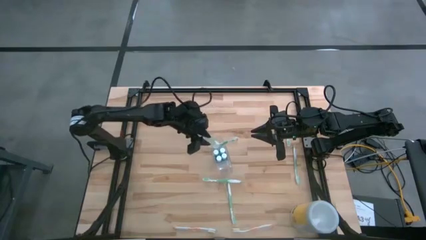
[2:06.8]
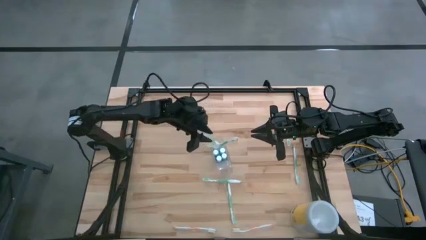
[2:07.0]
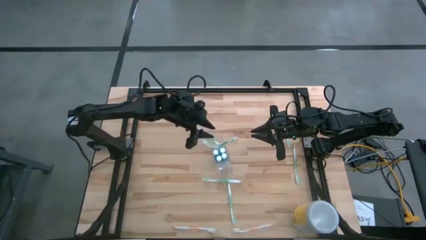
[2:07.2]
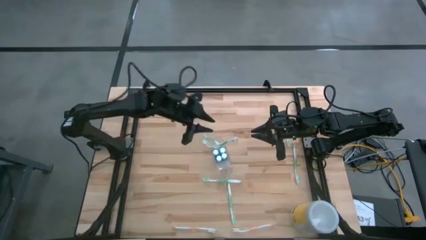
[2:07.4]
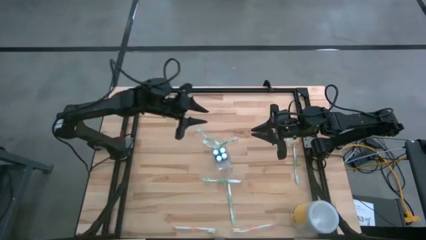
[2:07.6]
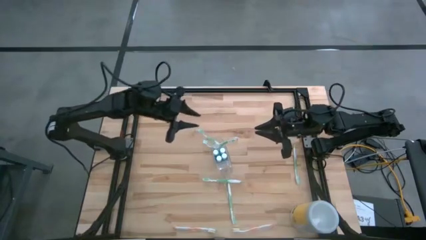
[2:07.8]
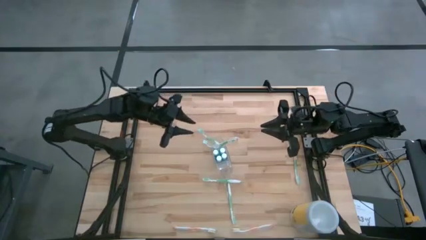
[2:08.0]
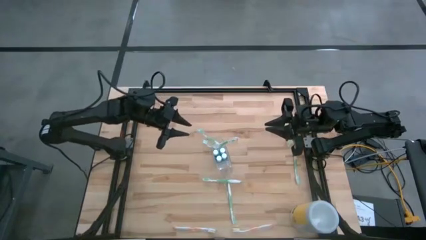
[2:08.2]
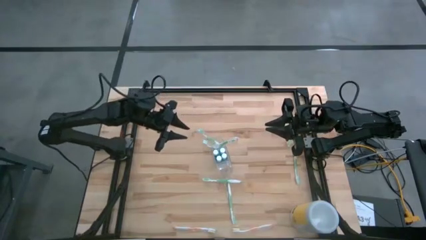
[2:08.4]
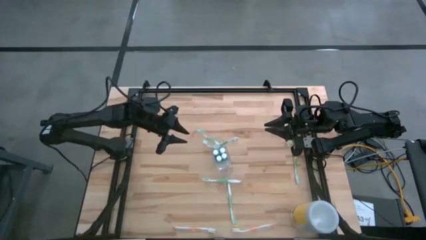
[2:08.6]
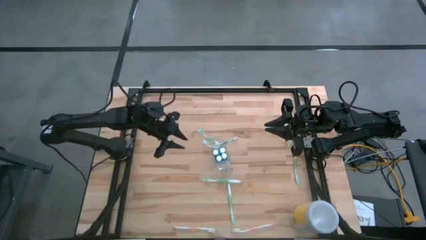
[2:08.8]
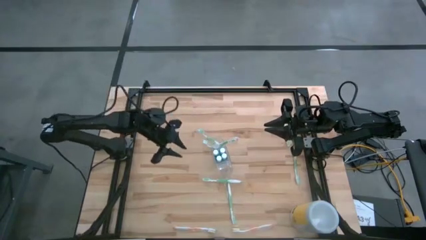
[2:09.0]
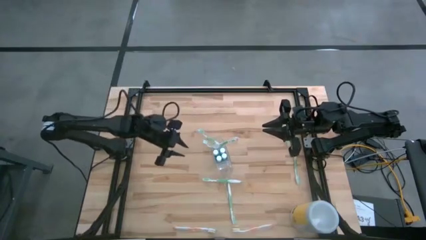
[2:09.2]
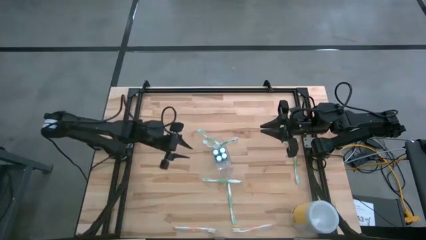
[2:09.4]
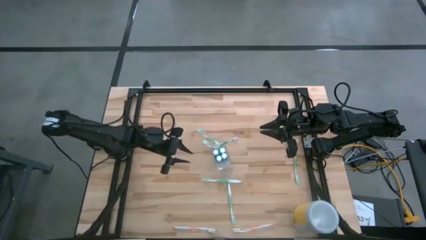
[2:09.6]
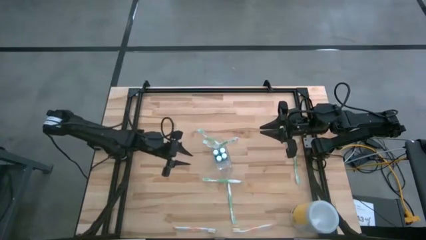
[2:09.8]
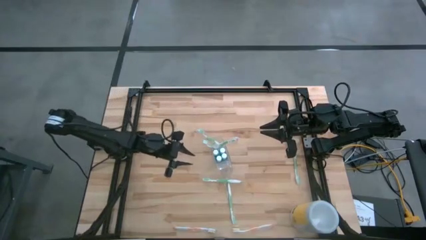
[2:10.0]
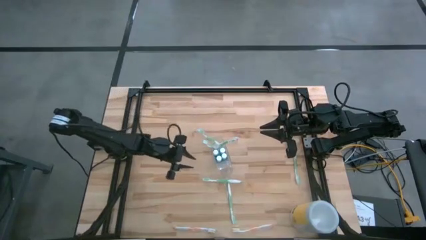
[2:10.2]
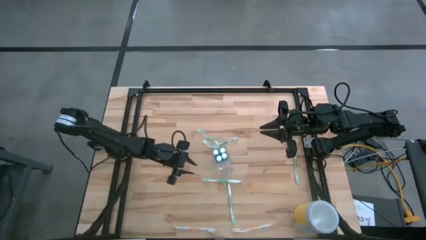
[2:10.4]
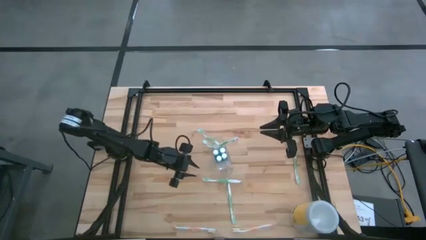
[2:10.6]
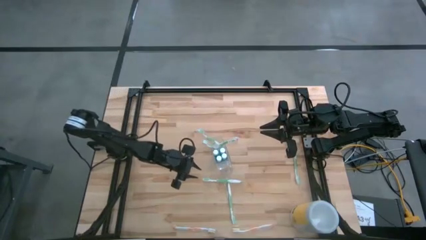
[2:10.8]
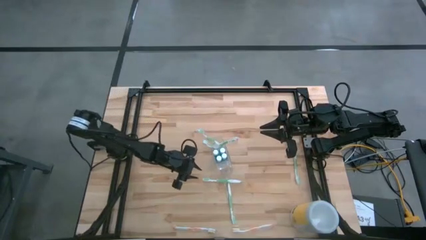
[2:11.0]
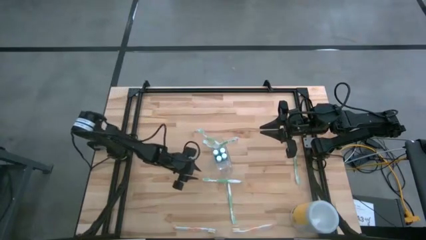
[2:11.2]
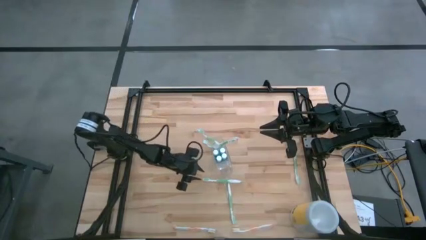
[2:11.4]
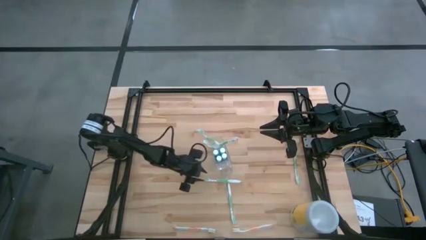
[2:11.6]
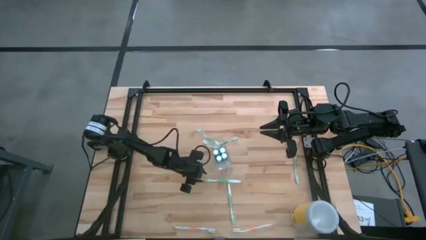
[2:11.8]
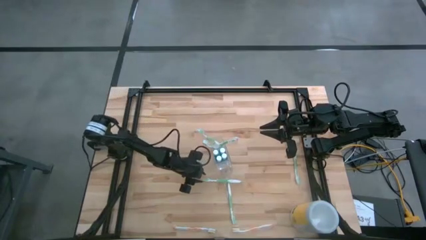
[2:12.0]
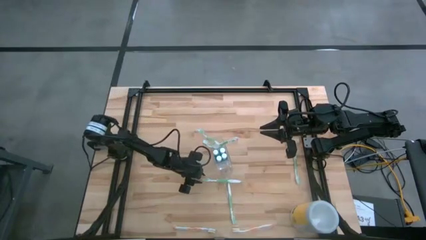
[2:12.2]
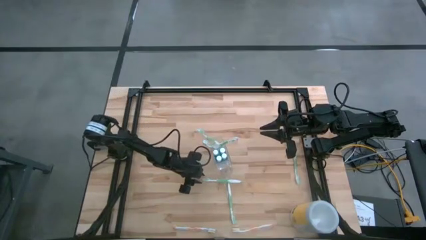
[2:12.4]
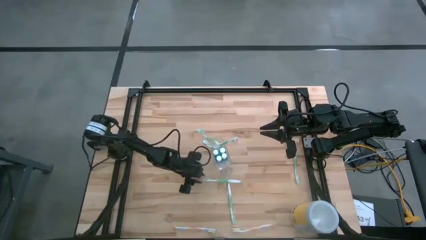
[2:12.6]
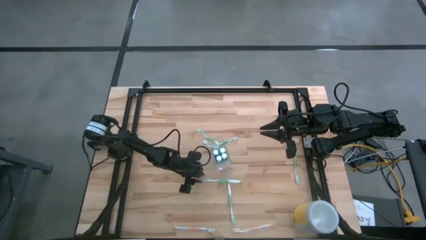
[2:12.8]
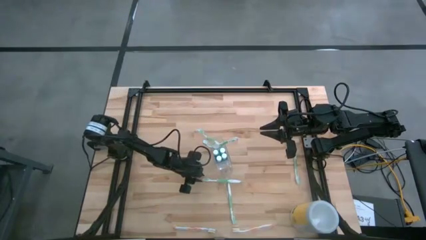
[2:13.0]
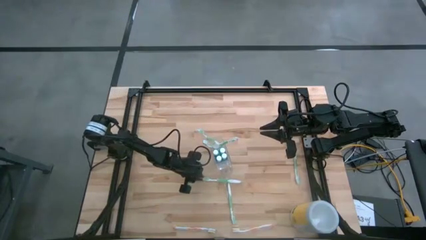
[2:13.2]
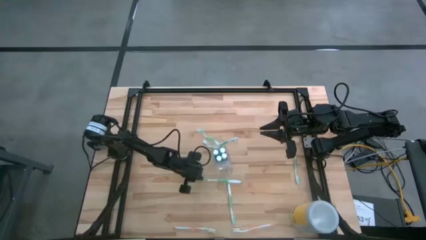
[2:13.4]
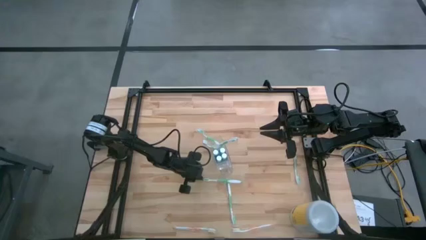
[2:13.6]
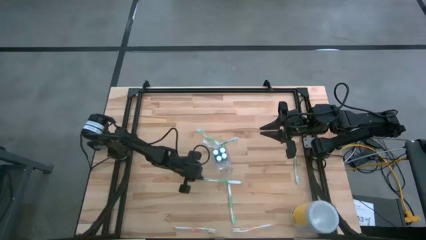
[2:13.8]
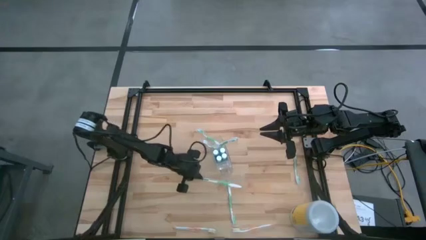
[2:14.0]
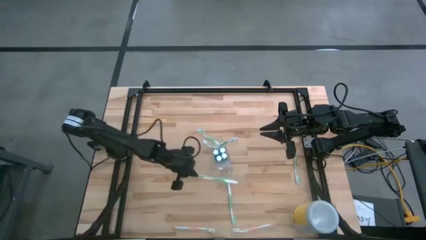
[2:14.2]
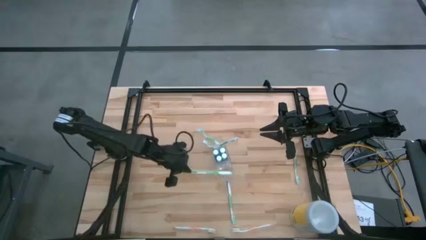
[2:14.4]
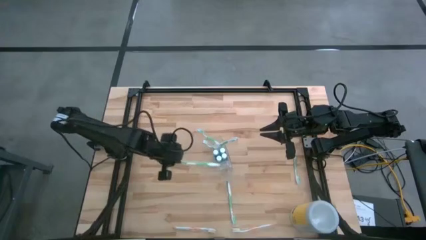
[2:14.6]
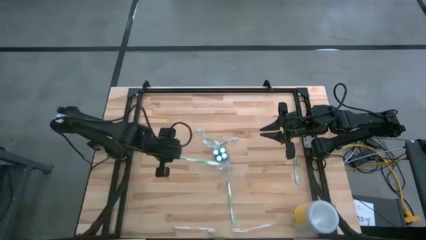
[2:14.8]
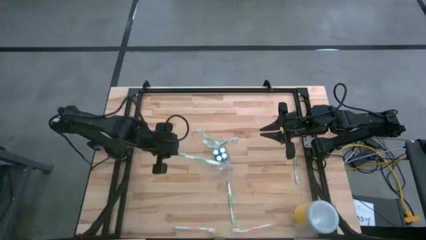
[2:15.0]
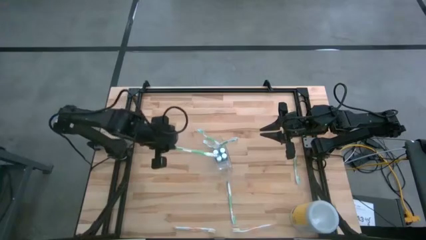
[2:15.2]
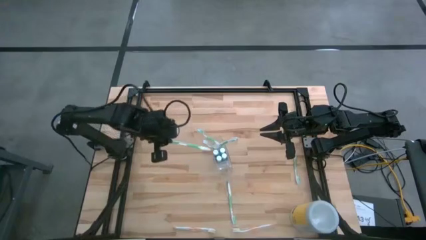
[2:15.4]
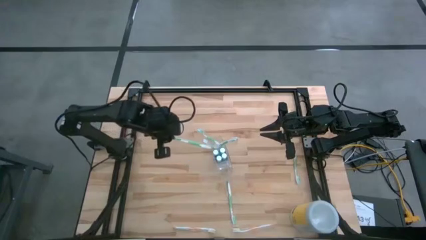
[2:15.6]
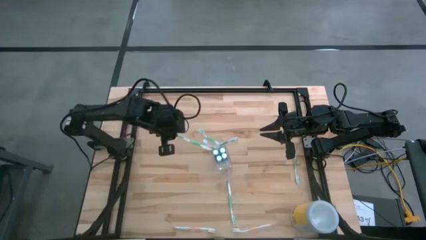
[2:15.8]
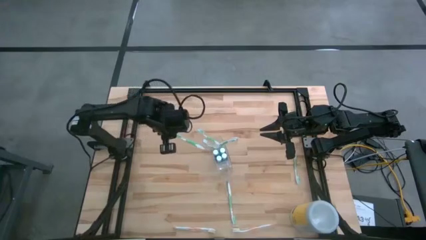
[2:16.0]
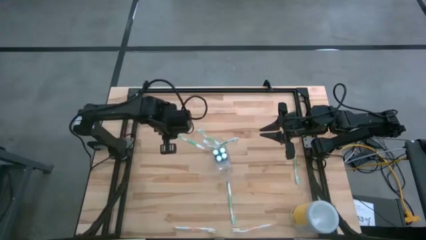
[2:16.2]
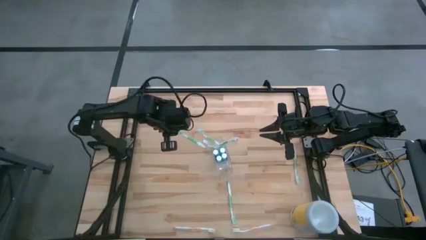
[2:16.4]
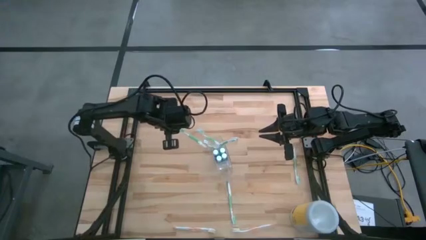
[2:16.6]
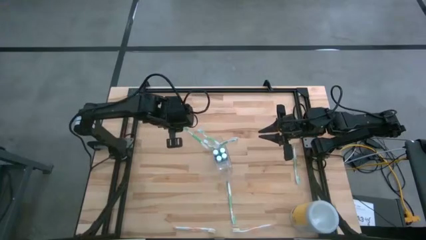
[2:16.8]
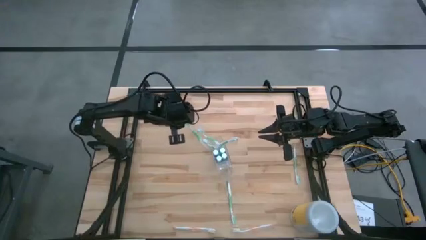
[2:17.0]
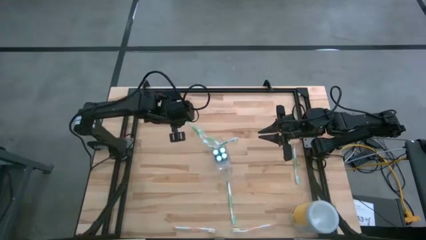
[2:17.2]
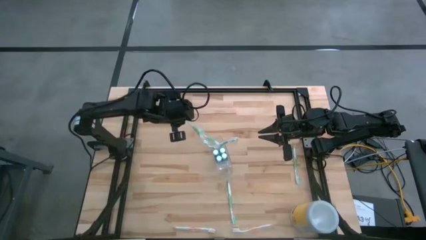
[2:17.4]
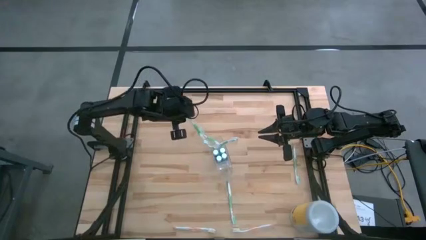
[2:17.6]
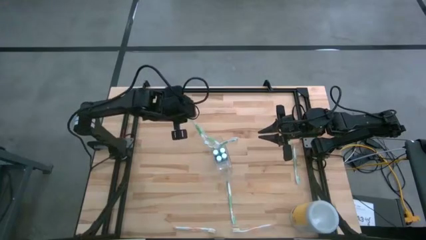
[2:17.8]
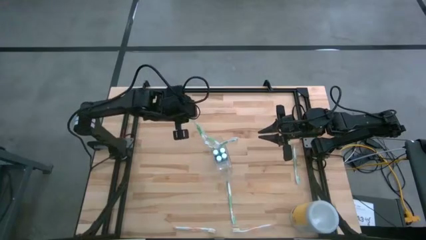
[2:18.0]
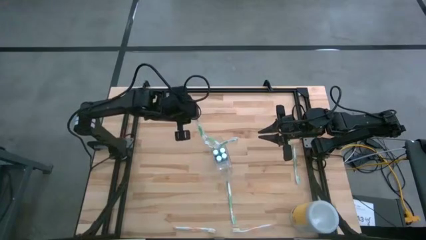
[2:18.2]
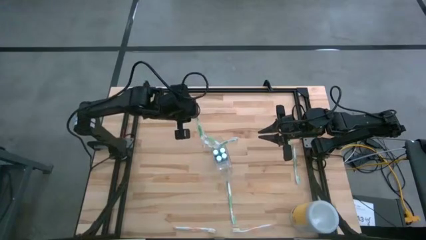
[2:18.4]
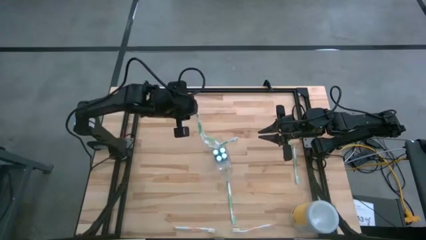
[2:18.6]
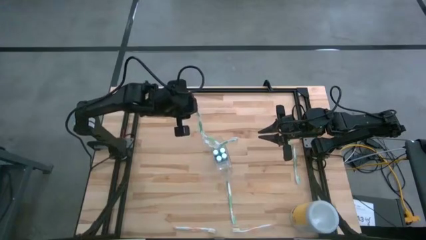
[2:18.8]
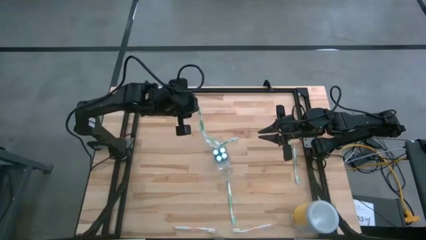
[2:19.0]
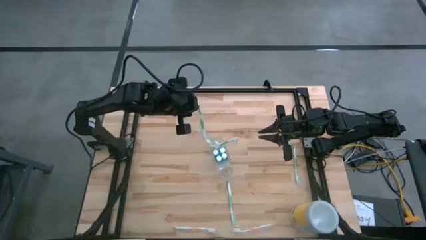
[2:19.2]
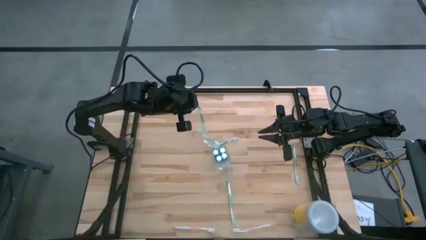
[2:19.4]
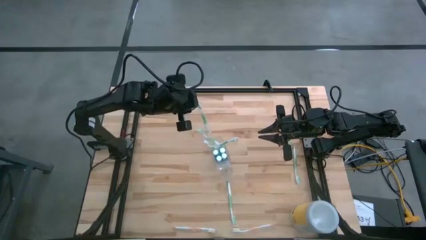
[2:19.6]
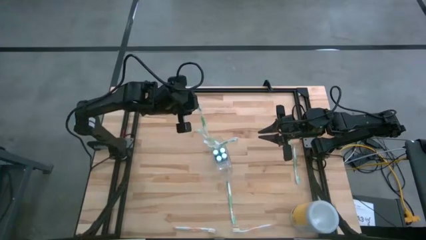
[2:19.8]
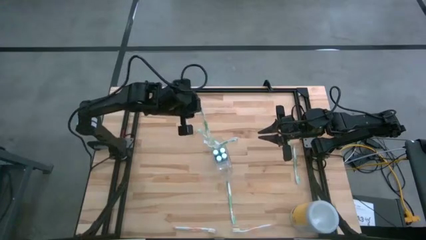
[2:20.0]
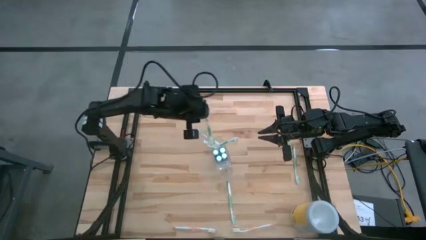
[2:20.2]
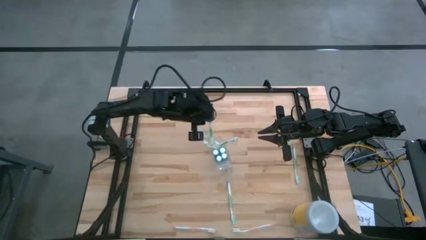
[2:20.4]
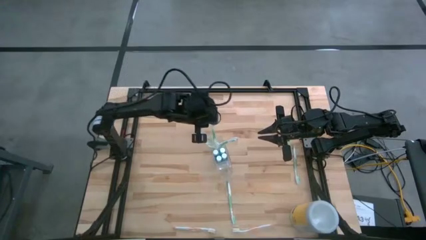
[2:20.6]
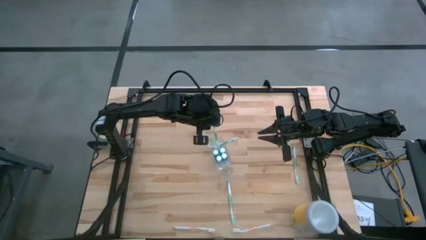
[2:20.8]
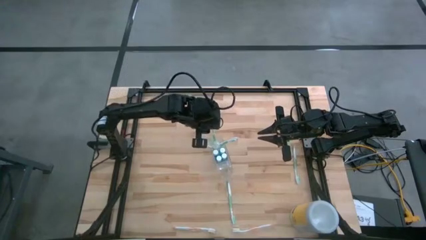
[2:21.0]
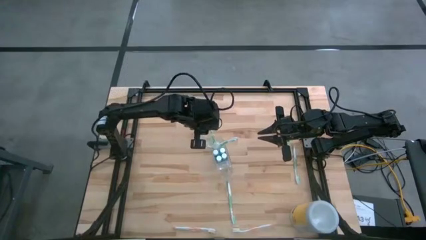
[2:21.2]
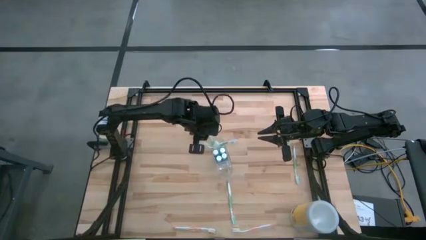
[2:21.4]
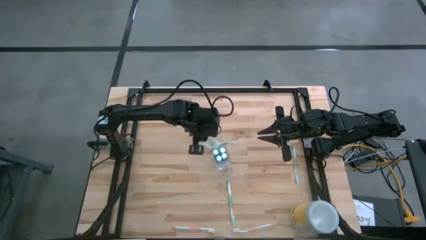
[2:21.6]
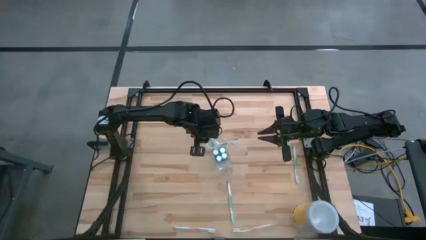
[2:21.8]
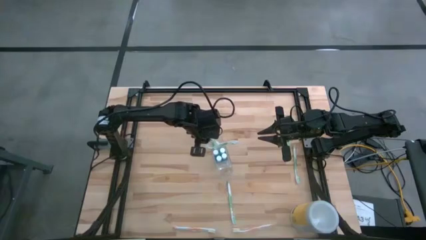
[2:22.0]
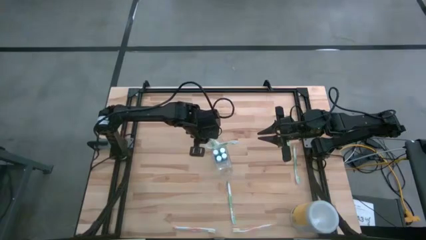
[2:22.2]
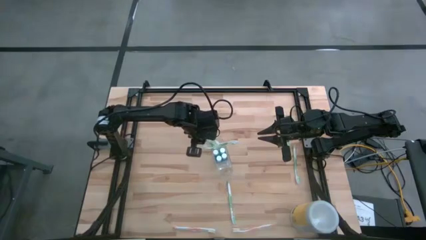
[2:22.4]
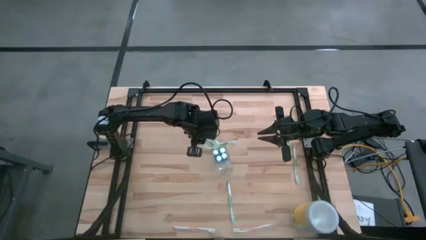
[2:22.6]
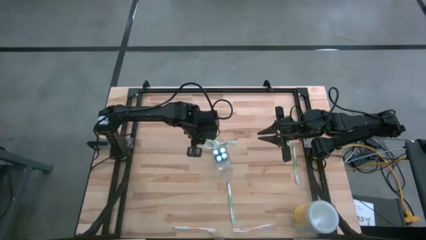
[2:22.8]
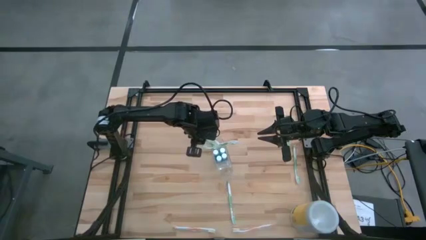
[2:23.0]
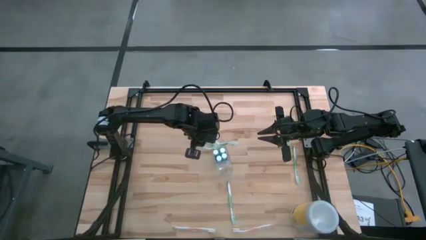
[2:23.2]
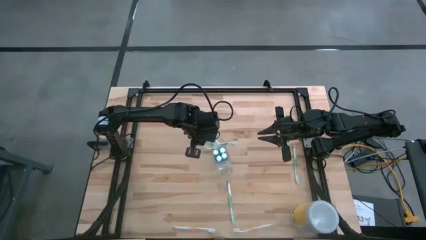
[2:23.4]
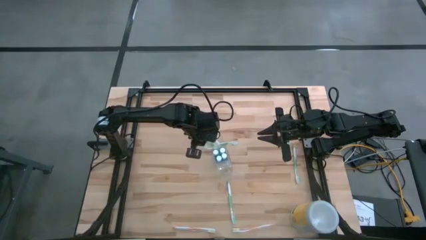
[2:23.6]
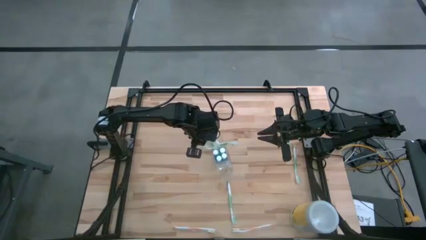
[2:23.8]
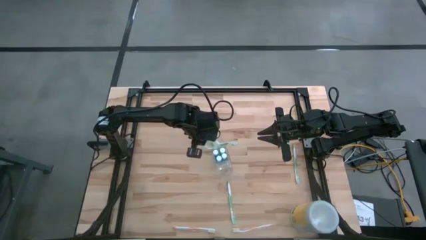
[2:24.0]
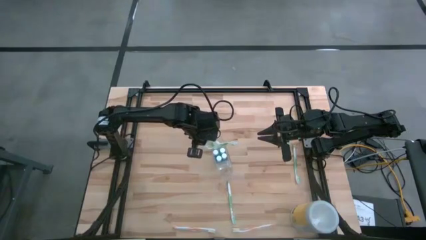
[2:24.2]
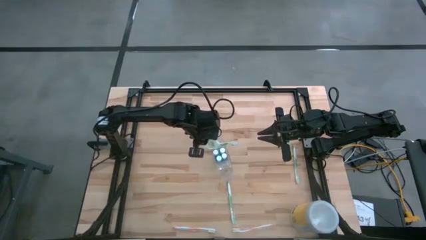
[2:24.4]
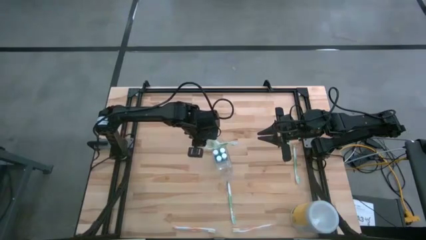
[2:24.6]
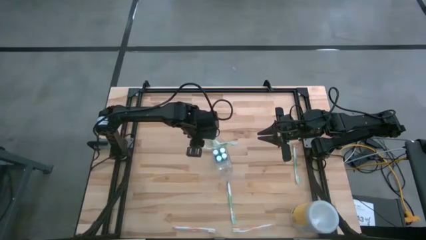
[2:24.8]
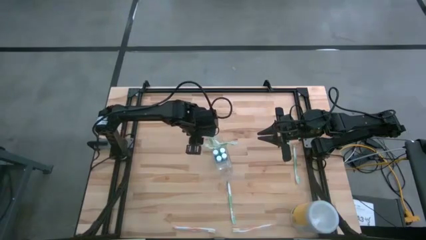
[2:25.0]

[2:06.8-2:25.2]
Task: Pick & Place toothbrushing station
Put the white green toothbrush into the back side of the transparent organizer
